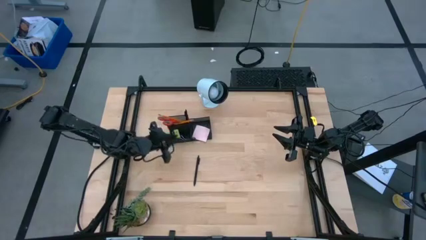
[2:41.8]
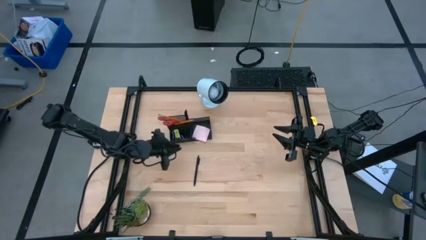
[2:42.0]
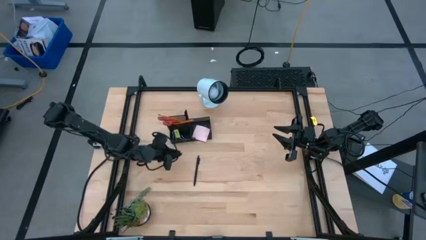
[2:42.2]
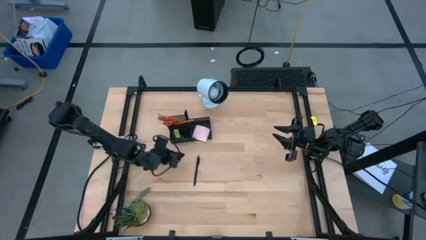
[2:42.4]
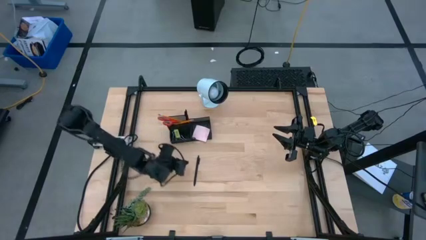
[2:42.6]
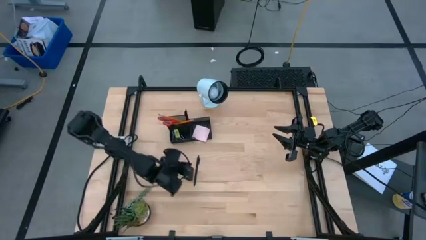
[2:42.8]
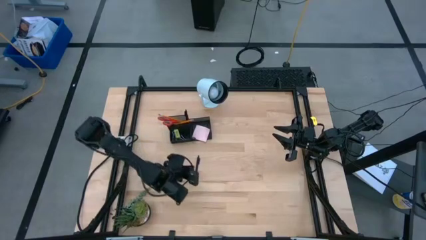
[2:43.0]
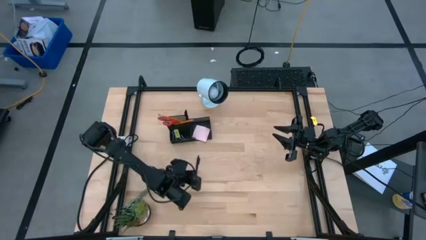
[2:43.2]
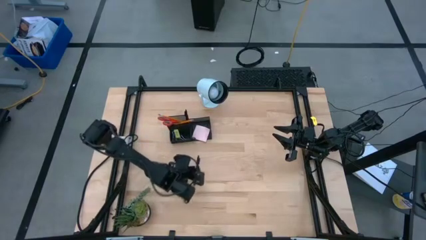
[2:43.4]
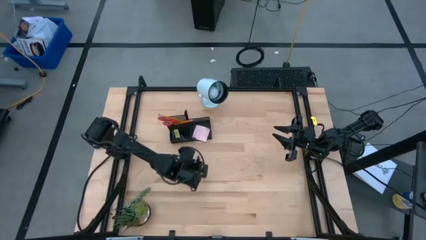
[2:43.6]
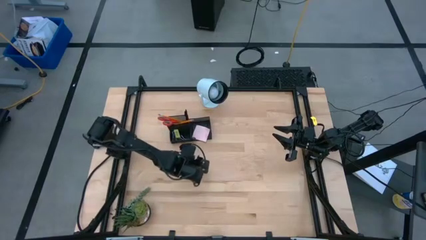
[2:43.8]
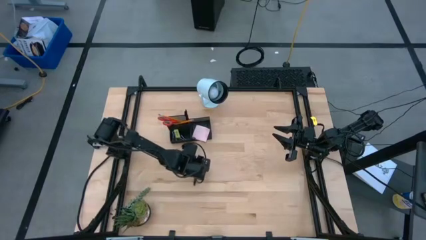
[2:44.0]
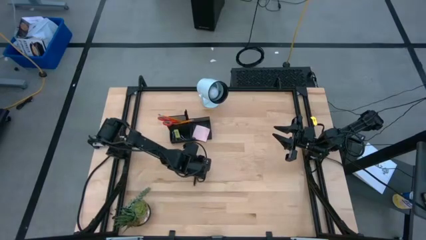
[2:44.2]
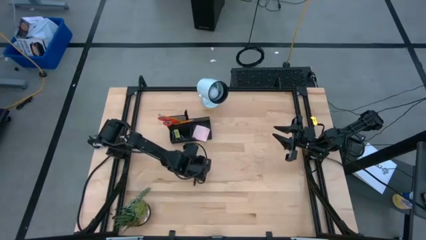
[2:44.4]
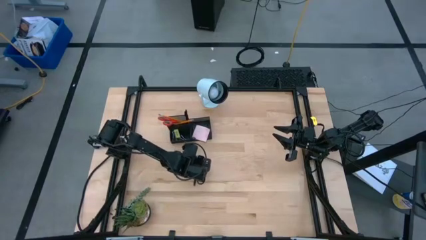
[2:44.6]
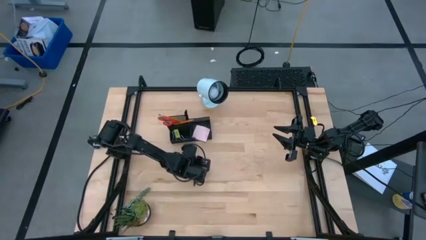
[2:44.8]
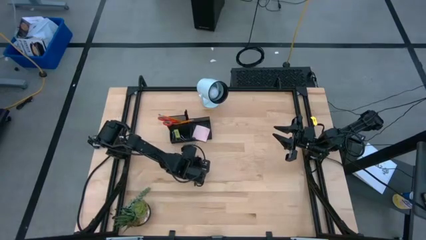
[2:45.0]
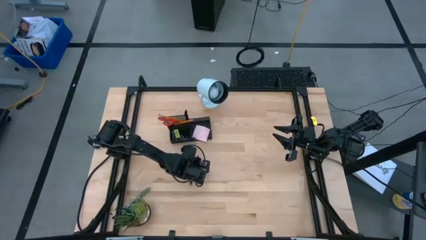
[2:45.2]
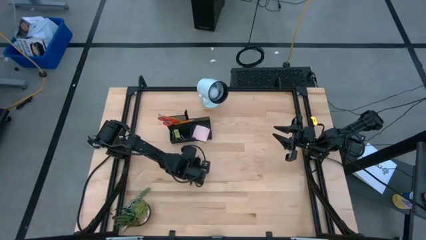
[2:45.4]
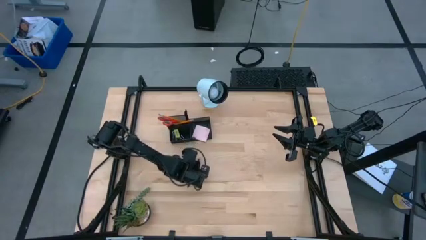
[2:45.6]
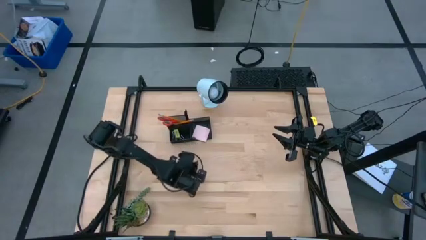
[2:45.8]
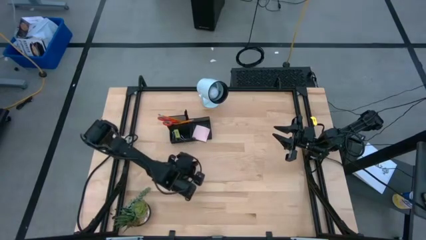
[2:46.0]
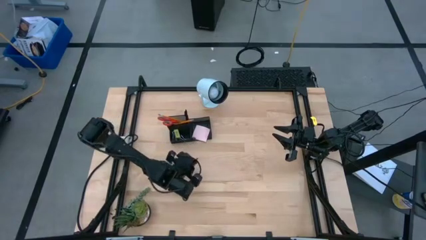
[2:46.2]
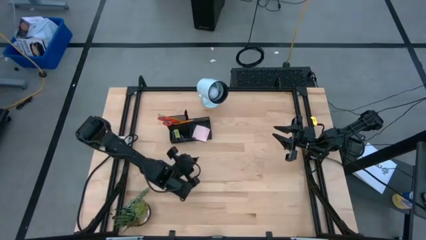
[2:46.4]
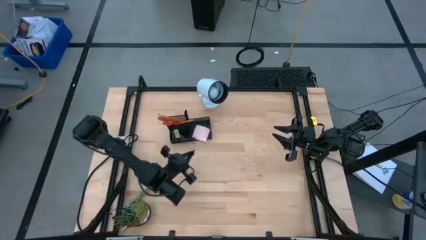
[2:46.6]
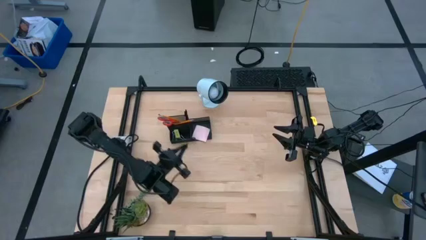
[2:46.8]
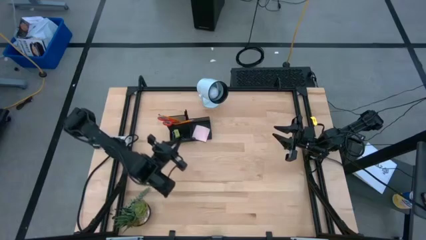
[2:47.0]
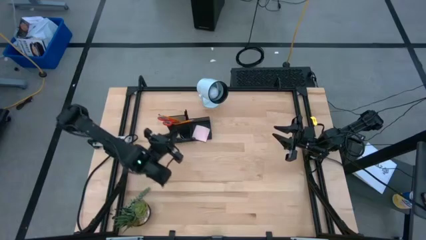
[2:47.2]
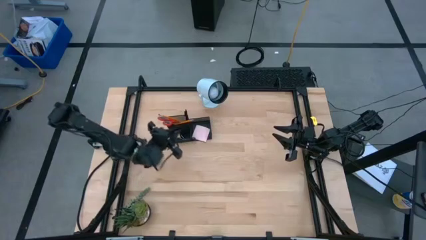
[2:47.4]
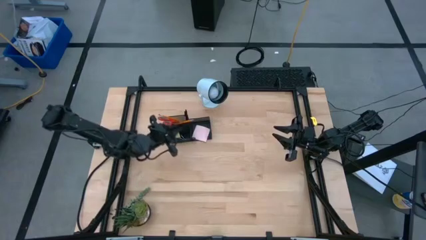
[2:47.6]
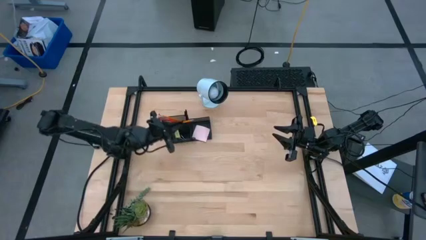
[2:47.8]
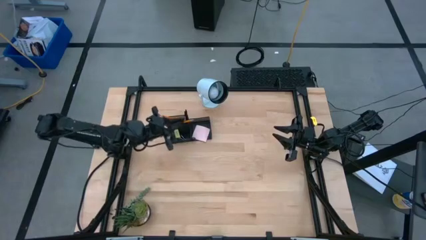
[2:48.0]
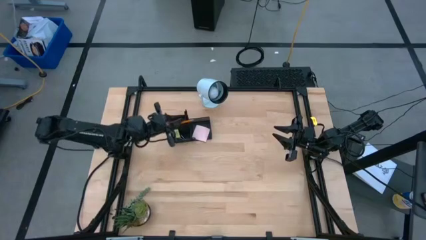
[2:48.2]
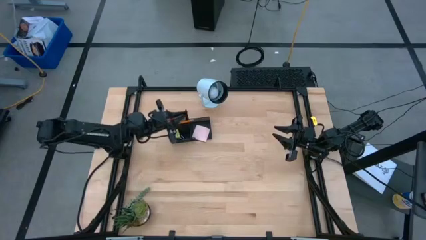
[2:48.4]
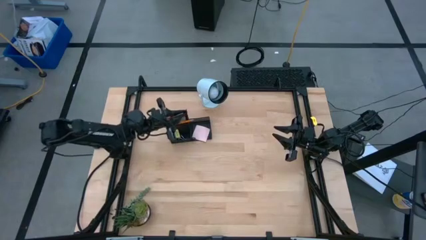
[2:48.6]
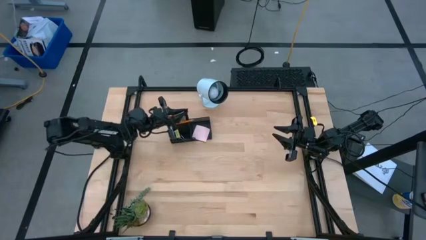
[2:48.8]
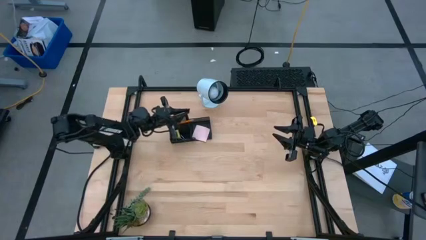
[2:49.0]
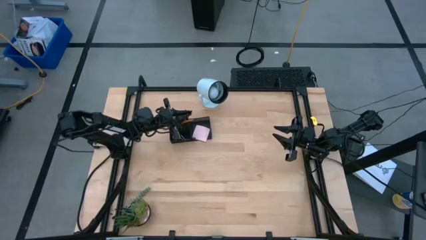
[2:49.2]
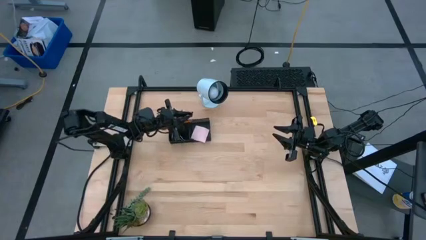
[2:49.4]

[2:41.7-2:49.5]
Task: Pick and place office supplies into organizer
Put the black pen into the black desk organizer

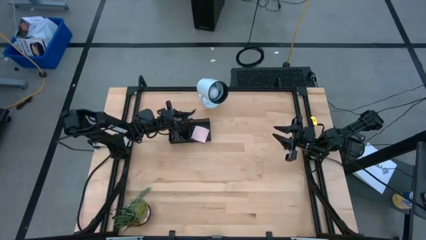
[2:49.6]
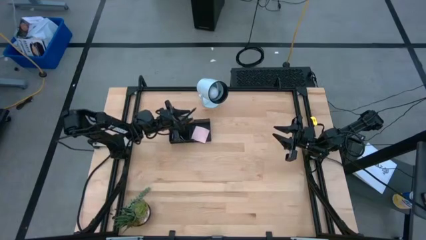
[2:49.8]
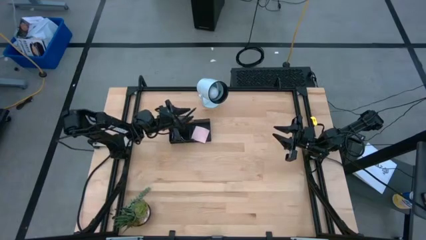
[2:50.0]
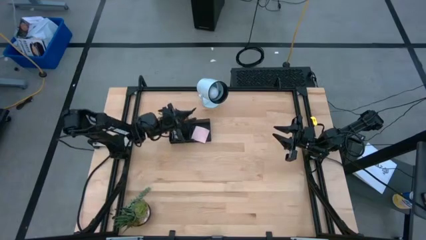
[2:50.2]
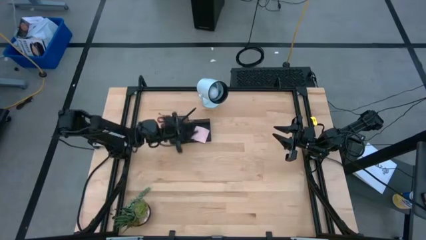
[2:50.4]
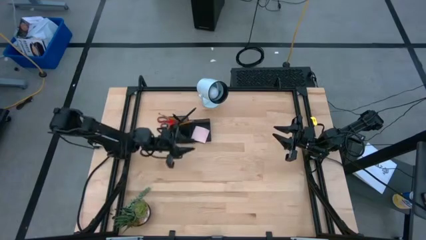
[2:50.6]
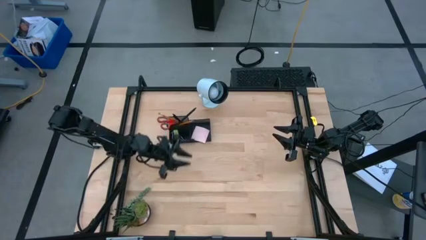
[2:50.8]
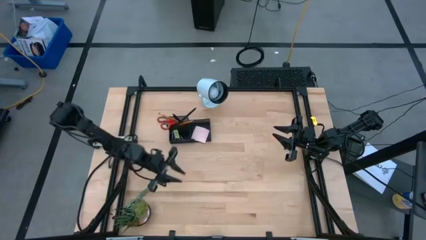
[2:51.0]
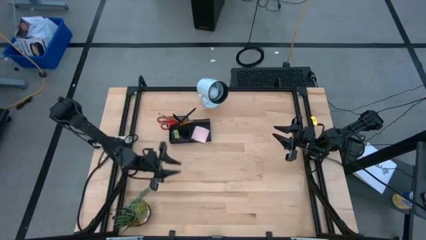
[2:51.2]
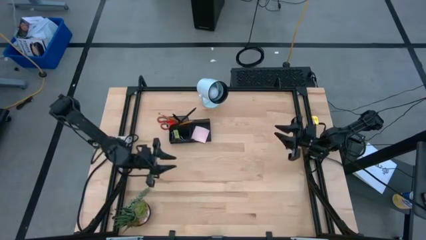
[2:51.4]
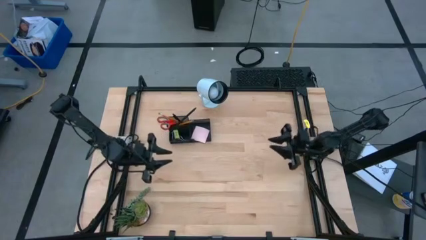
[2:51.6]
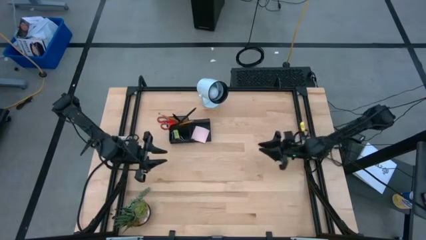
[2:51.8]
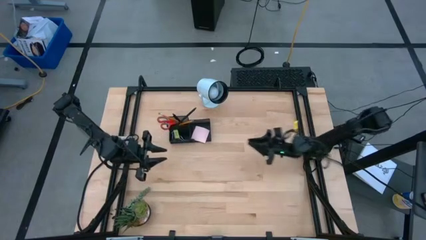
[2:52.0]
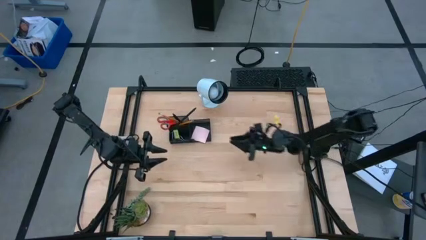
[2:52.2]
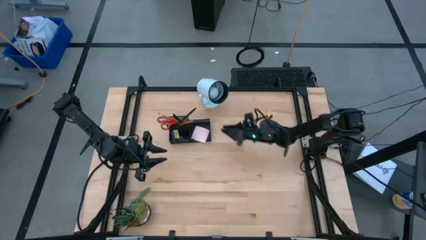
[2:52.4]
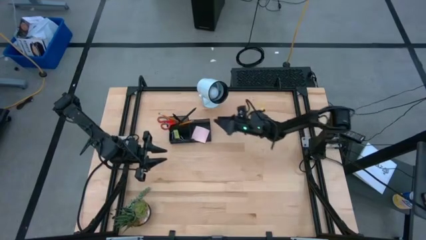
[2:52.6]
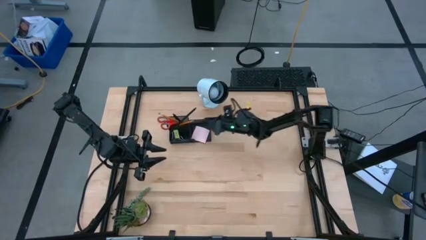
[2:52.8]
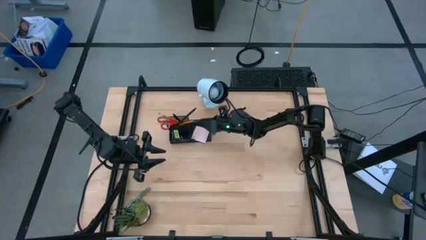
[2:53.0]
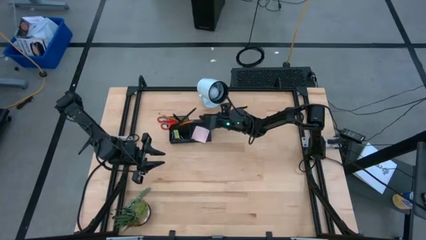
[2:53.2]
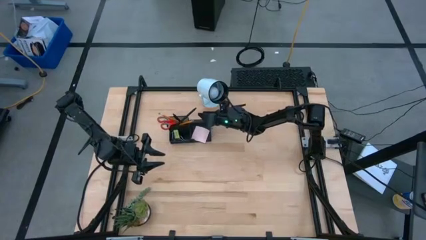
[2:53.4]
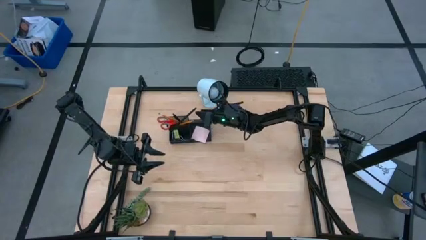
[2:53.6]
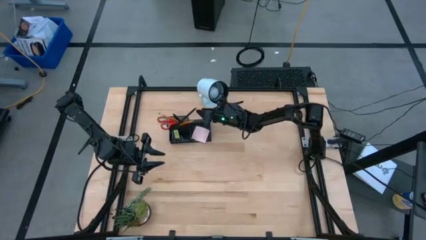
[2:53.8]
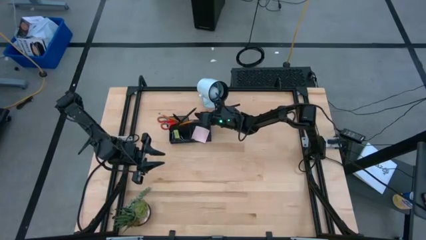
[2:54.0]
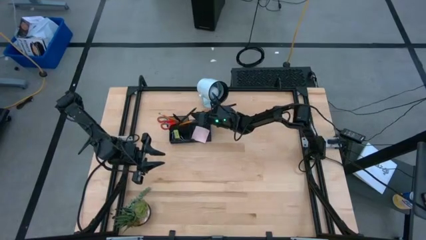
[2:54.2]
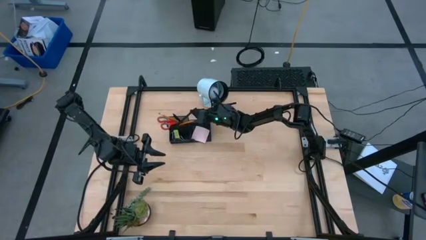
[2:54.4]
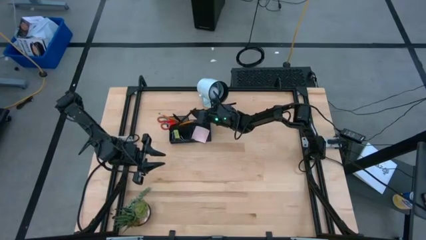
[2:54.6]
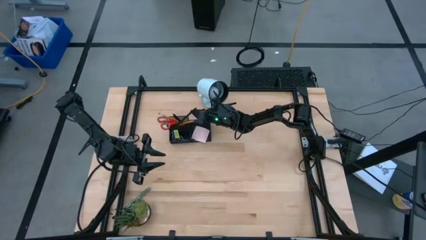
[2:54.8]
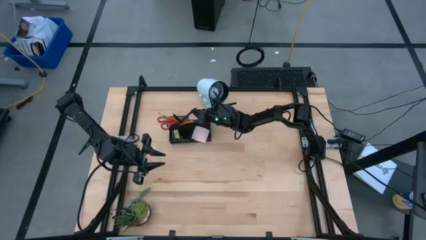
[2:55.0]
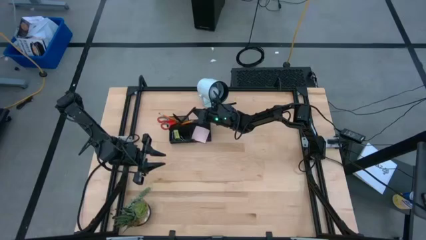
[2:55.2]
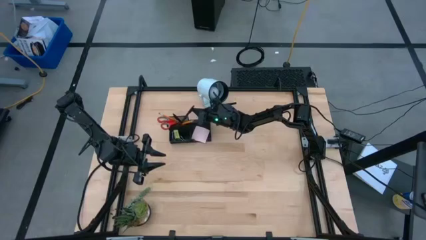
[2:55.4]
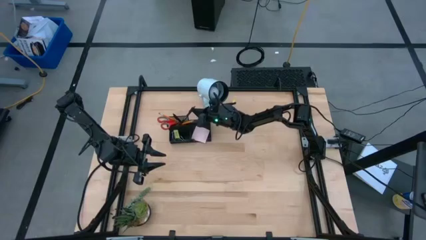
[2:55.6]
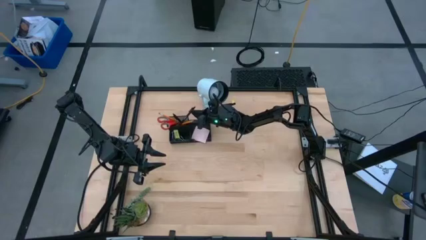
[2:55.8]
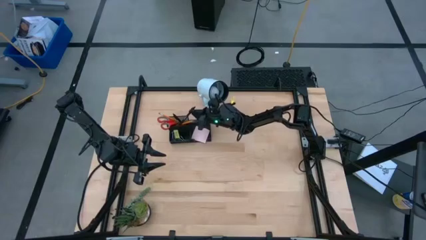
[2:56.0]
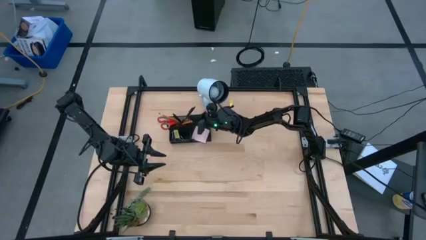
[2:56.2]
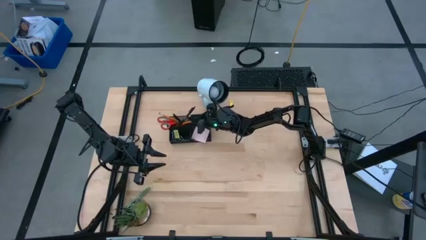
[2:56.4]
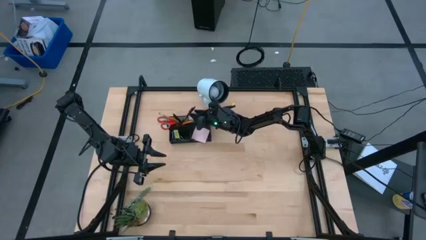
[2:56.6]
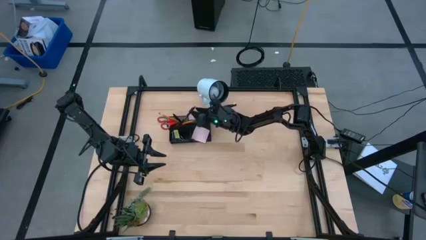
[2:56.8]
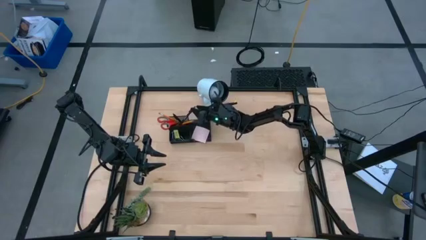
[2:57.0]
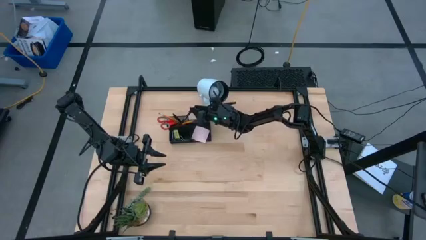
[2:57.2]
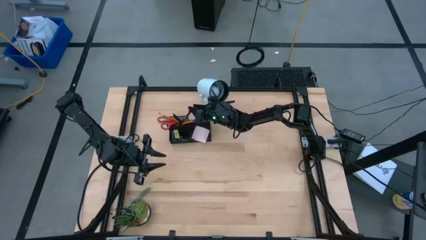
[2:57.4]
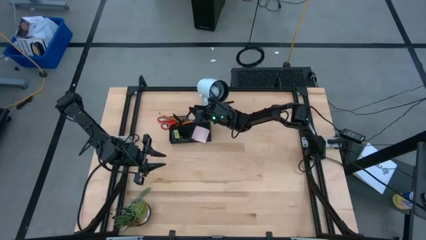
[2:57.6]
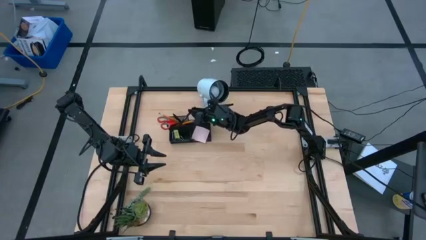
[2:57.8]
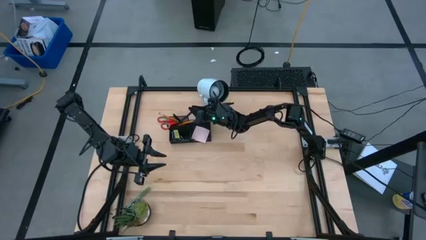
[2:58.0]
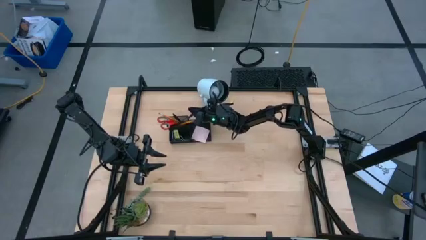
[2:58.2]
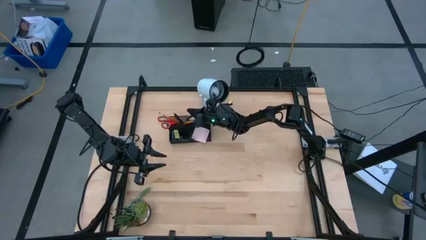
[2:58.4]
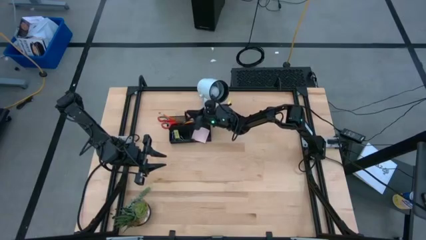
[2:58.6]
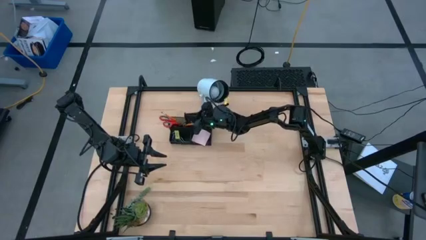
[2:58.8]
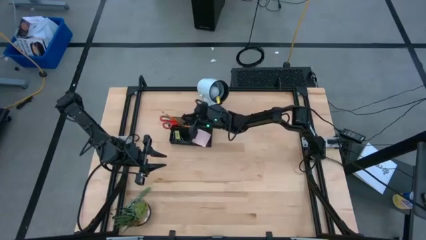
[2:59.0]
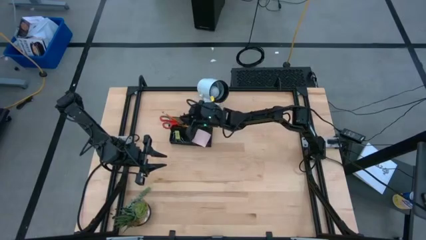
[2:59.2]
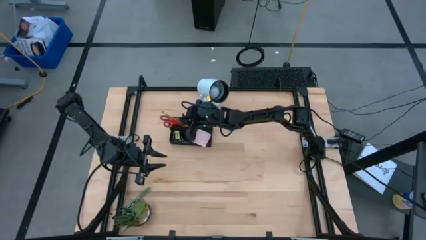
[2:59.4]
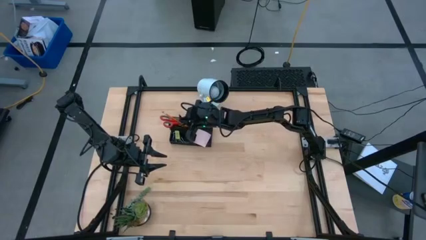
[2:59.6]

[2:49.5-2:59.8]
Return to Home Position
